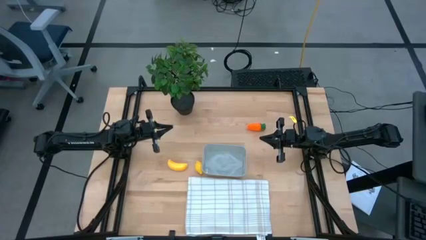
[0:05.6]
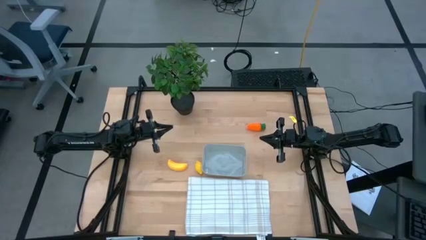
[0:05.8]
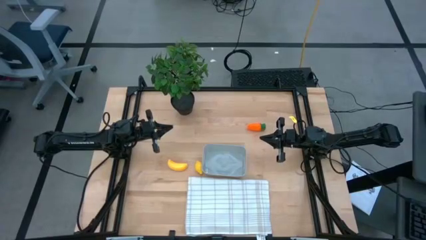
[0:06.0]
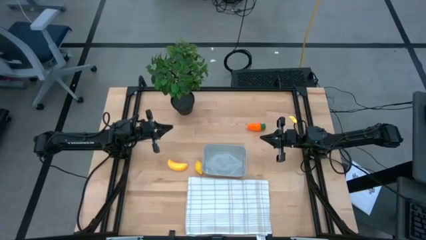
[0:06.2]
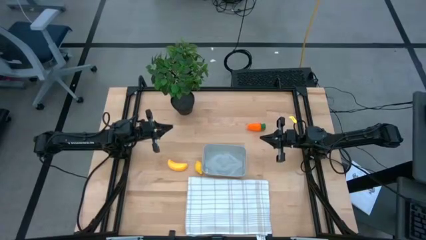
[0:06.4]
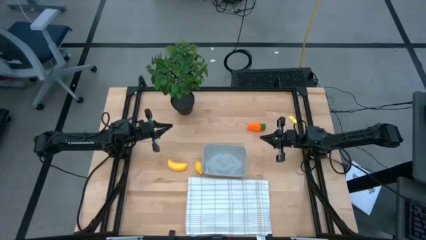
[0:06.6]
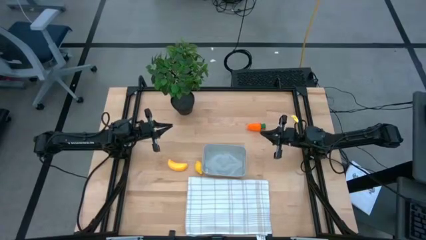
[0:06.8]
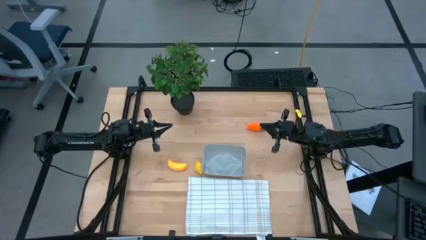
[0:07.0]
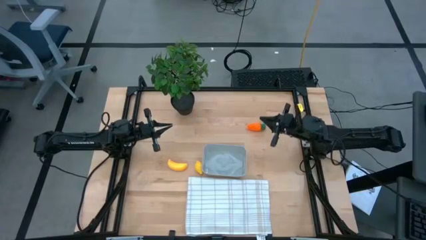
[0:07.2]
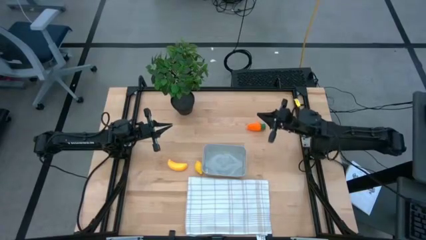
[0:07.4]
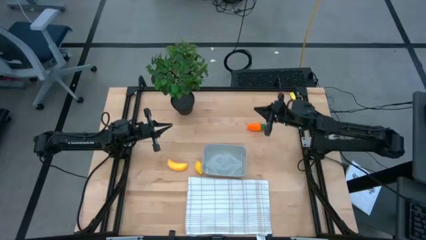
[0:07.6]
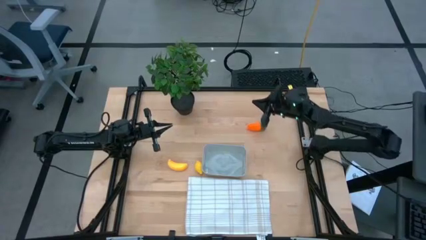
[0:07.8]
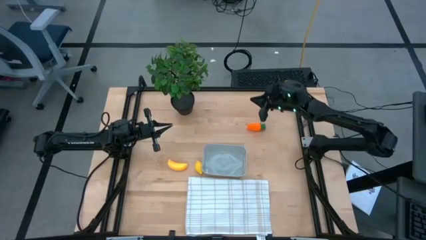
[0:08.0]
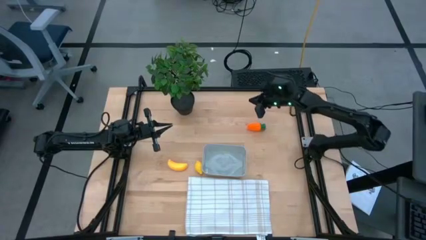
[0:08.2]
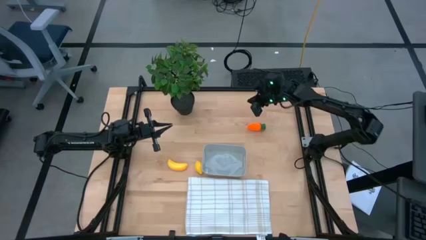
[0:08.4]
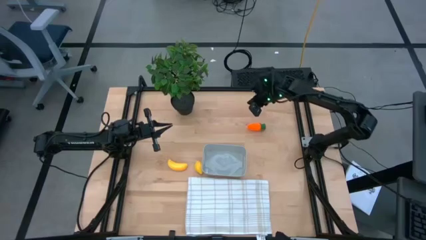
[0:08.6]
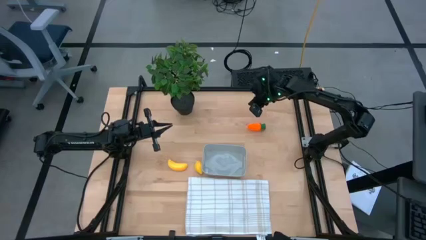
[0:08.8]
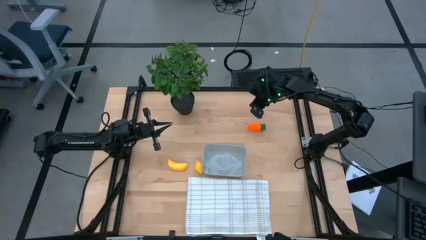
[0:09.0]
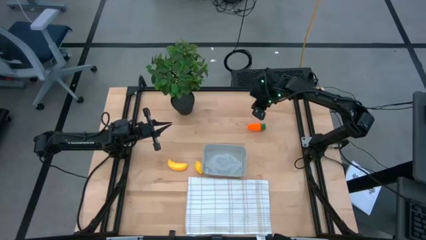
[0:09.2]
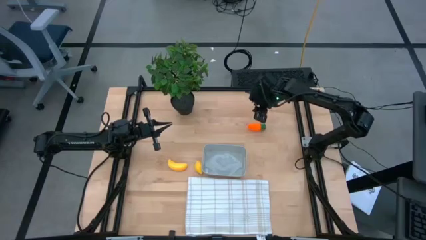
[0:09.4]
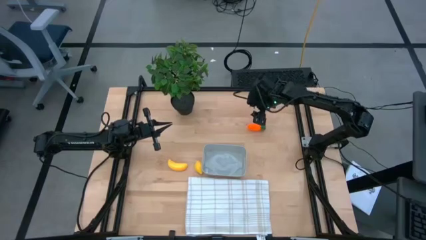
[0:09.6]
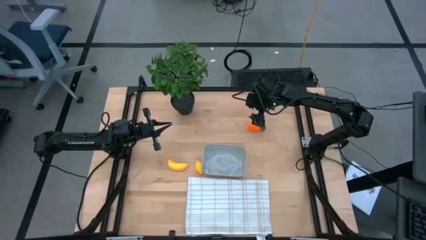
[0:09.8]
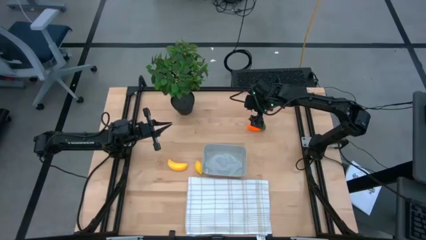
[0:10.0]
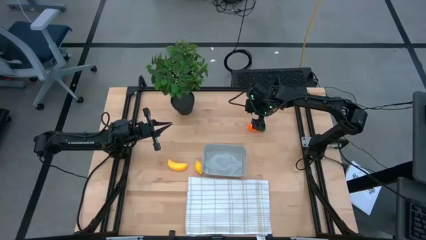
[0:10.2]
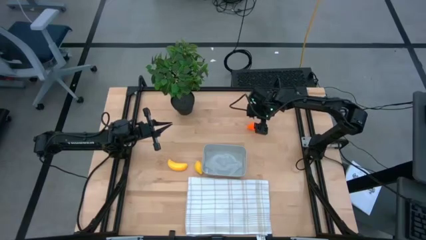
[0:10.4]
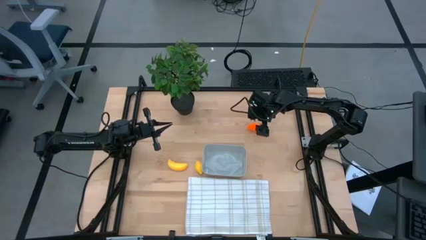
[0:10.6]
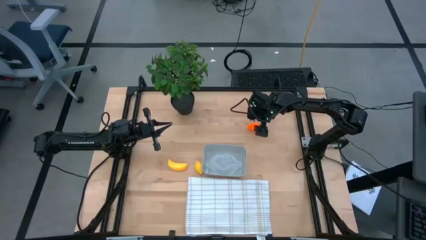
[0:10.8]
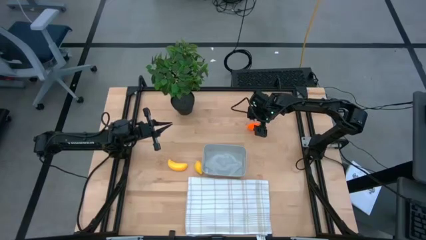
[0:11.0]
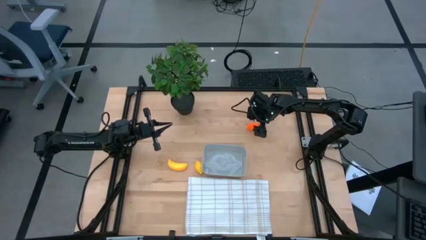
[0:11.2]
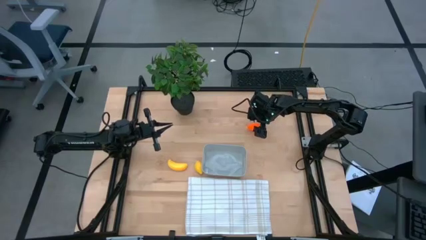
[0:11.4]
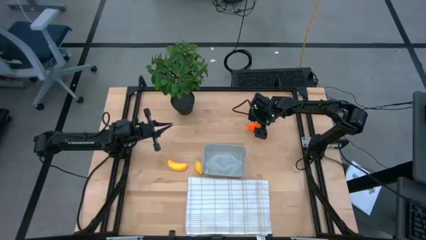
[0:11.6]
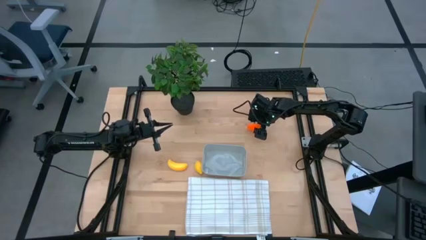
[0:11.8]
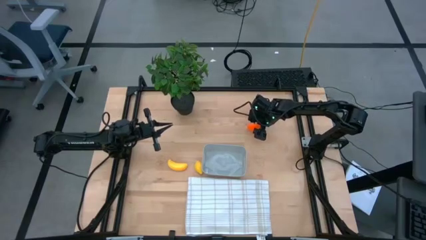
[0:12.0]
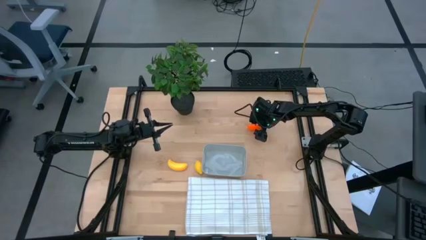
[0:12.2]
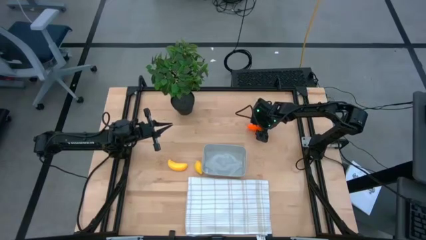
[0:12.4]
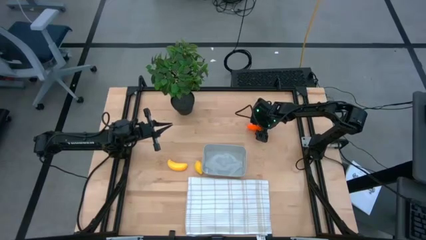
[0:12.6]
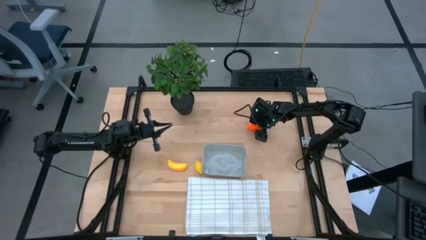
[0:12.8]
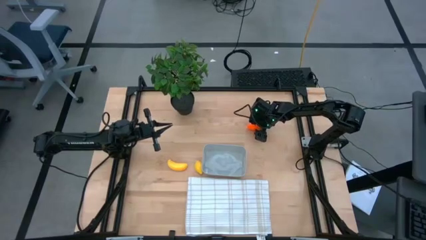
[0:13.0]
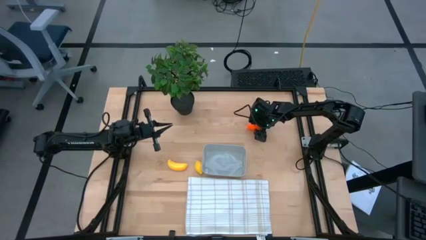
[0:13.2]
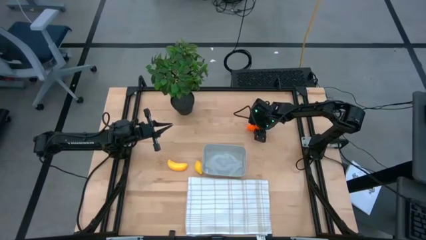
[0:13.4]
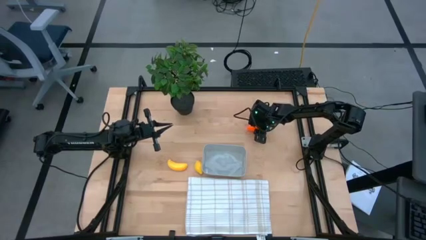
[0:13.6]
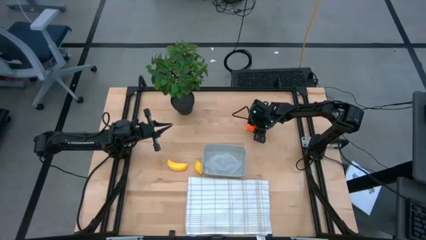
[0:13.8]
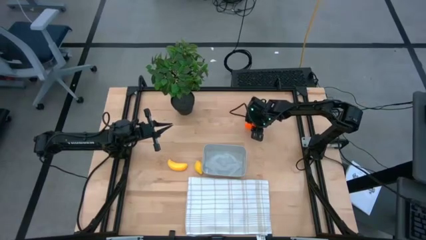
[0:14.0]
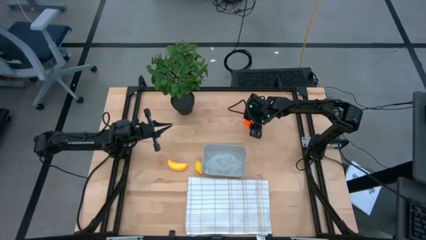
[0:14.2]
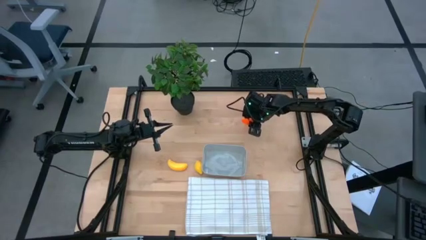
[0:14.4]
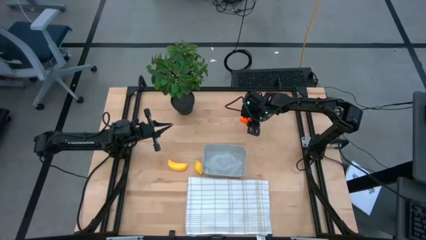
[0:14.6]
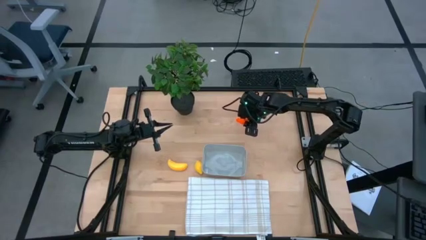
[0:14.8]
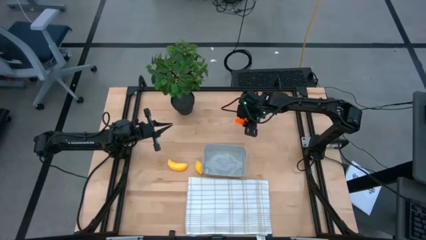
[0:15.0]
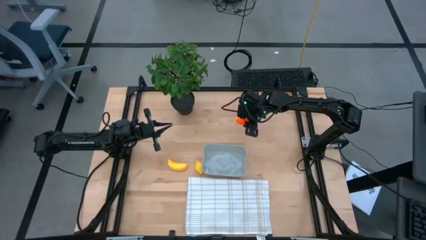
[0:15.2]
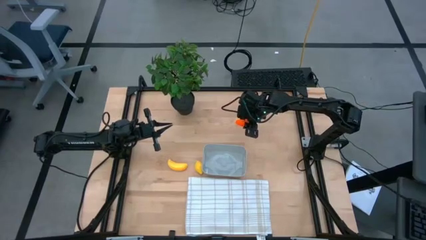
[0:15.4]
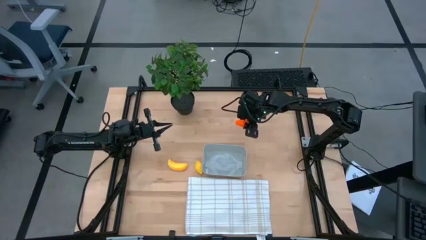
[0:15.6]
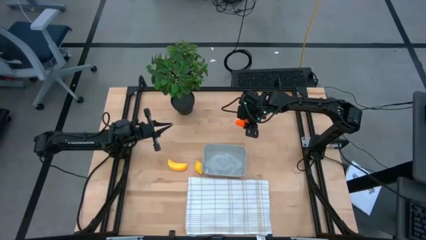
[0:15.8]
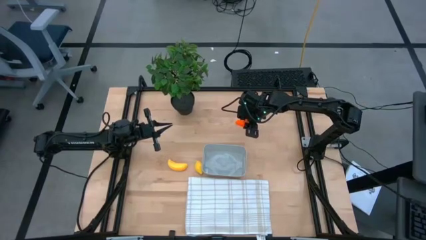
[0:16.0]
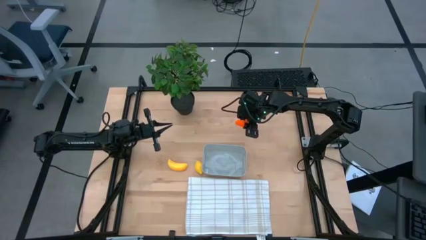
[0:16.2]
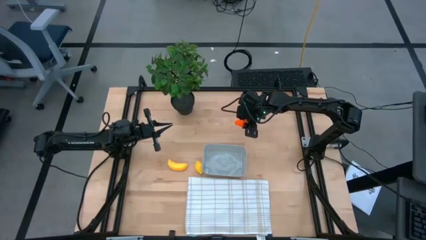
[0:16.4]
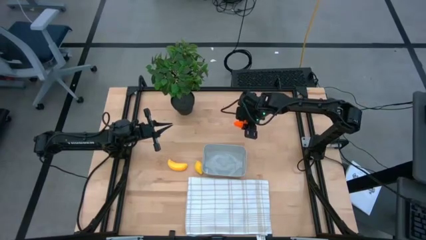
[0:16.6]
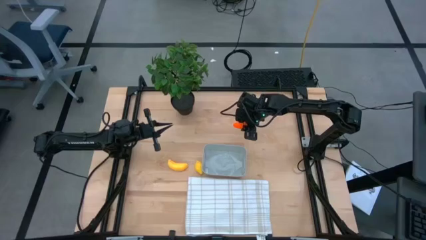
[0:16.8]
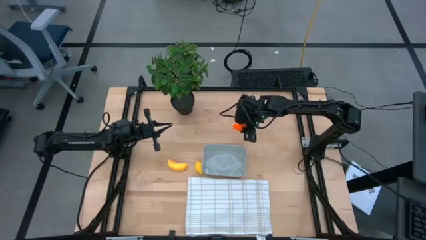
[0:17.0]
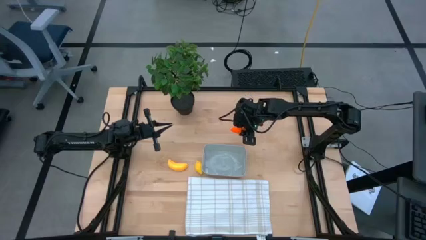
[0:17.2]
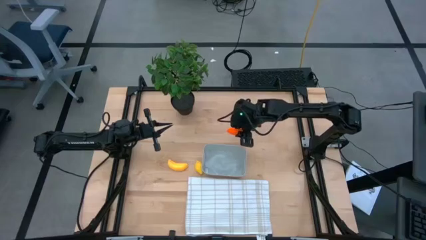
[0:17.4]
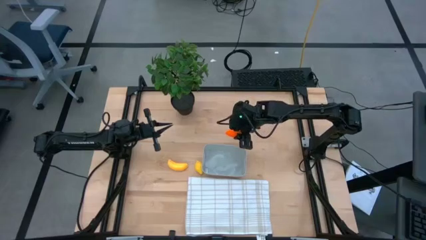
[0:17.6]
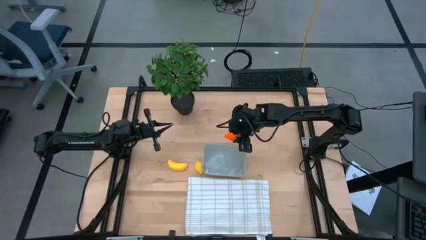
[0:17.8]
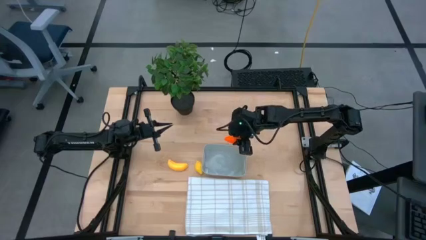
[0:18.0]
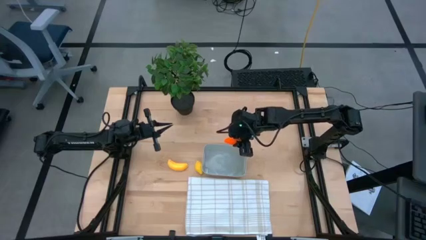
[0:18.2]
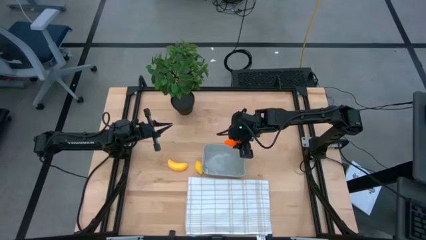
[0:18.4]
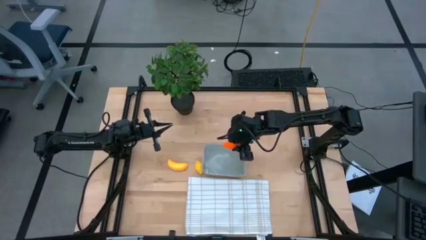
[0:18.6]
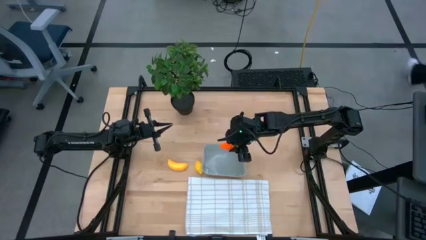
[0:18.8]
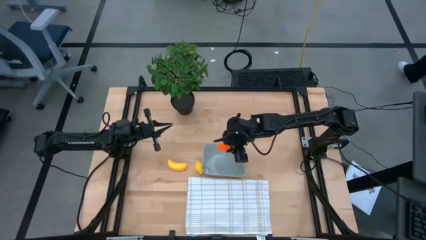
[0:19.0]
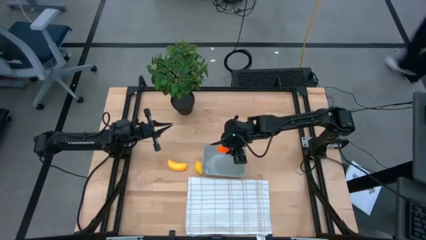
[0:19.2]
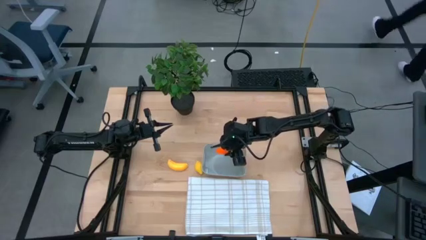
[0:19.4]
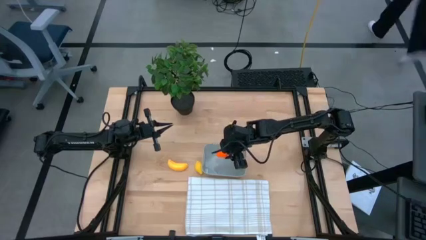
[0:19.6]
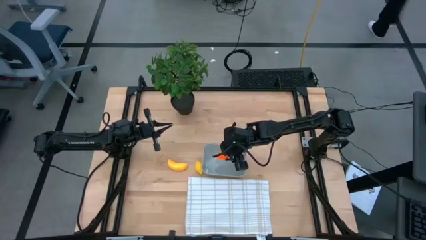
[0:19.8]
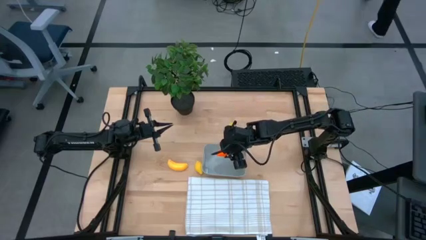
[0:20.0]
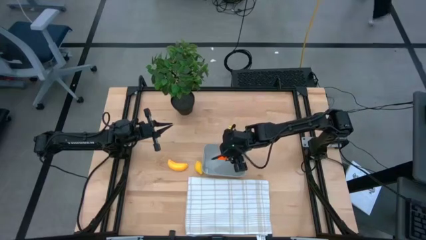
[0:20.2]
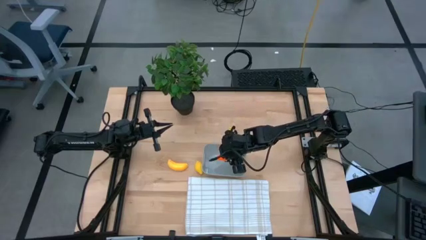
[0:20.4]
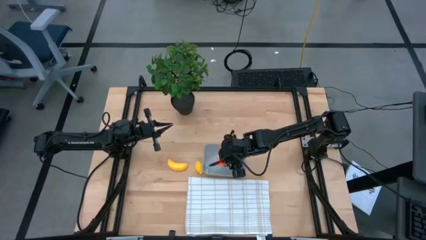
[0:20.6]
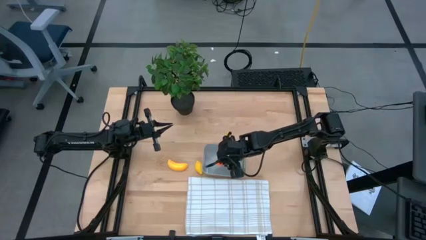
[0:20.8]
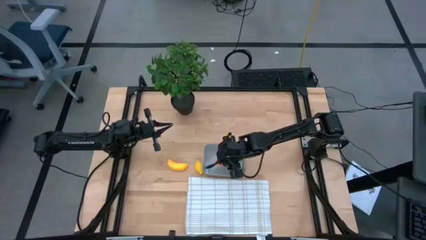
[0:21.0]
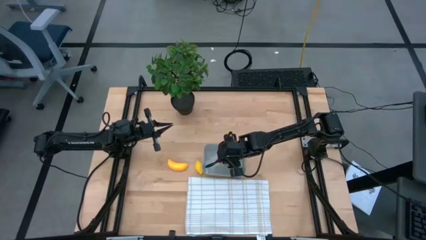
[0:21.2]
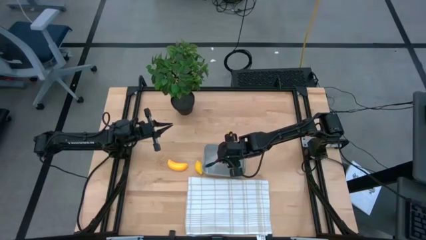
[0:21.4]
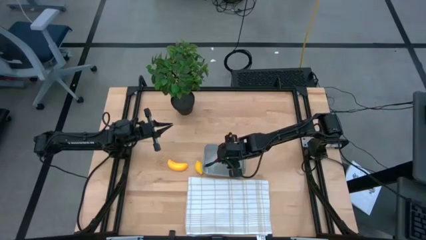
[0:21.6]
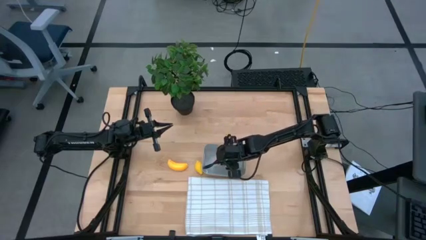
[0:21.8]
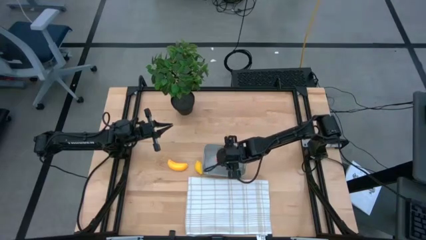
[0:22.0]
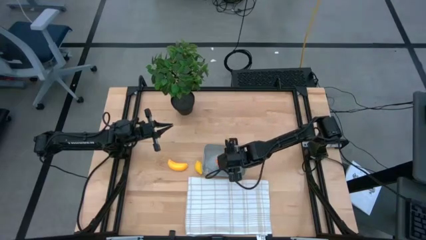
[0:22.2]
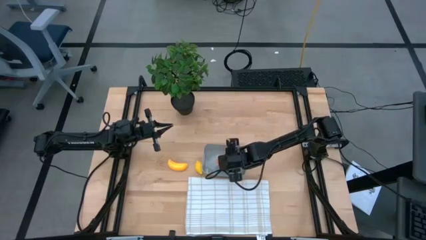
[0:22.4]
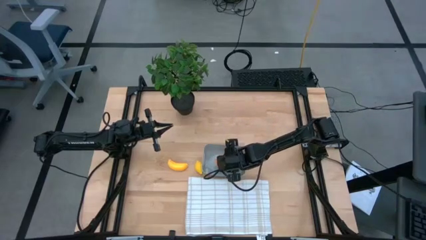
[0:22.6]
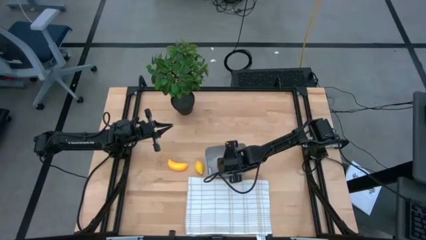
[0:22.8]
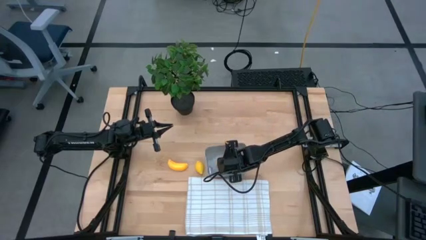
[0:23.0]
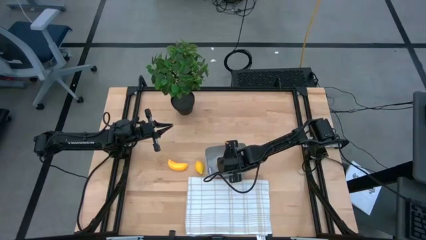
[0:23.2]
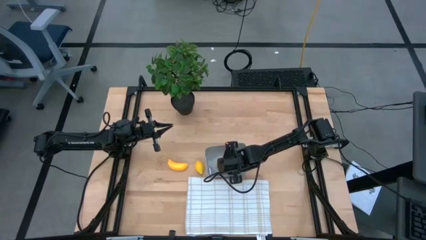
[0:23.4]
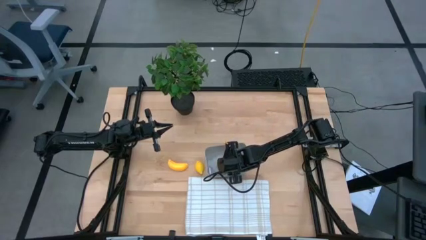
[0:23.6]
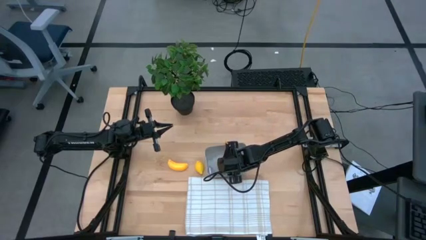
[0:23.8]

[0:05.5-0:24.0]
Task: Pick and placing Produce into tupperware
Put the carrot into the gray bin
